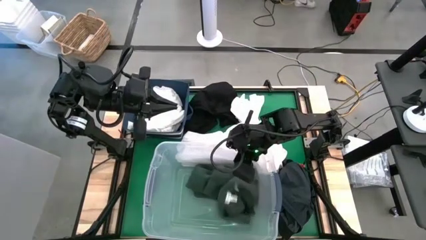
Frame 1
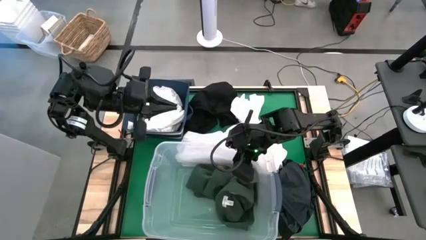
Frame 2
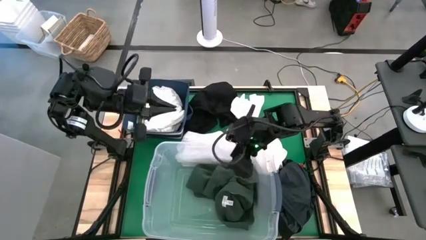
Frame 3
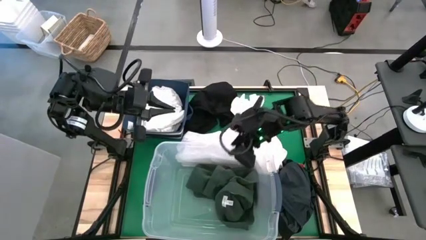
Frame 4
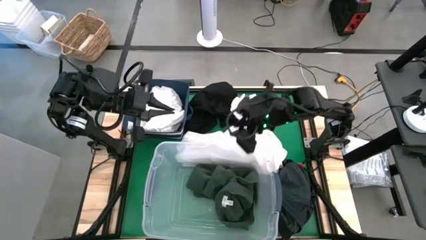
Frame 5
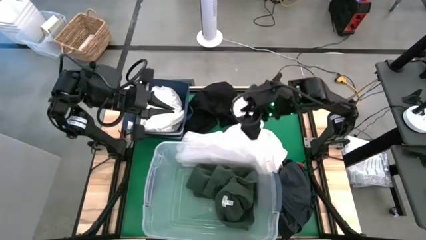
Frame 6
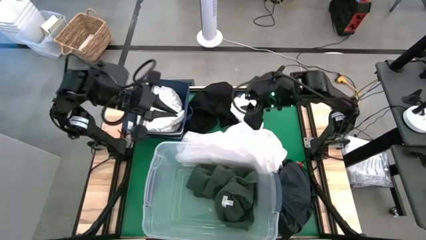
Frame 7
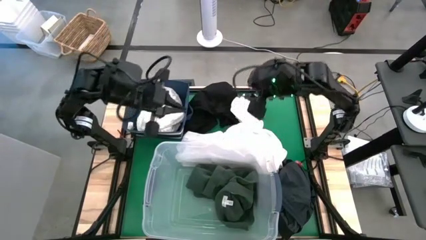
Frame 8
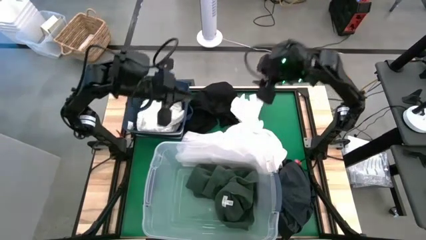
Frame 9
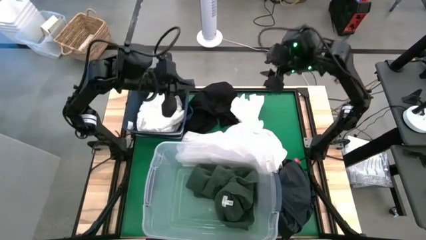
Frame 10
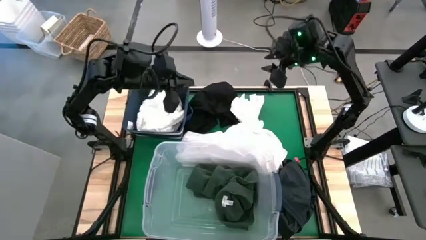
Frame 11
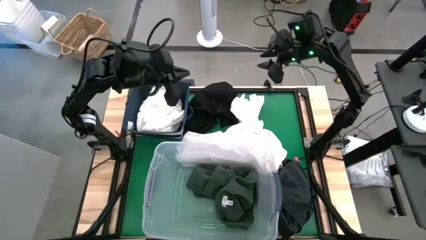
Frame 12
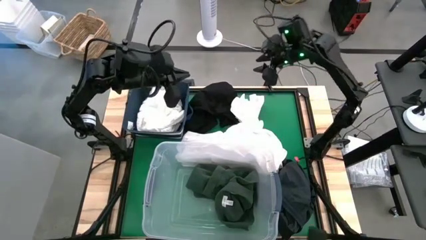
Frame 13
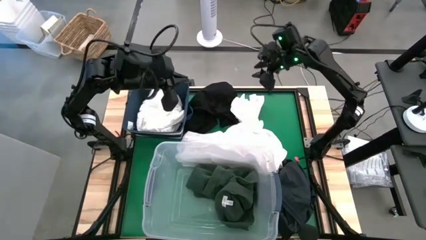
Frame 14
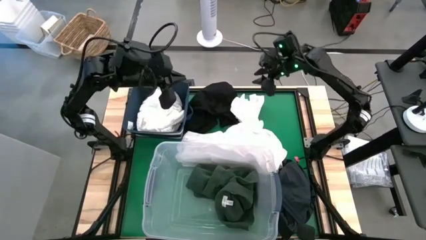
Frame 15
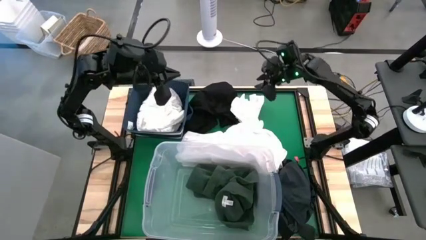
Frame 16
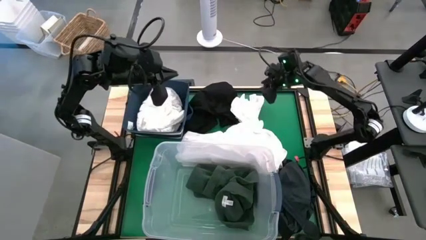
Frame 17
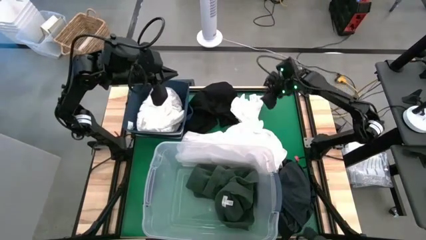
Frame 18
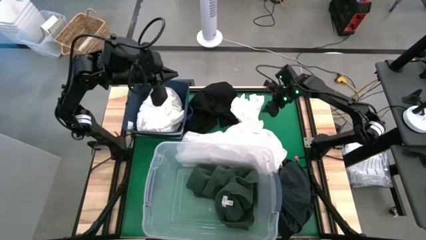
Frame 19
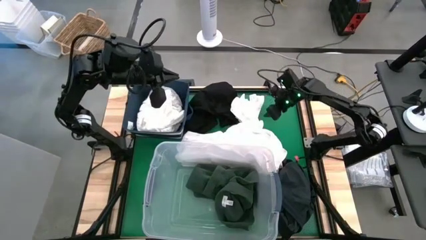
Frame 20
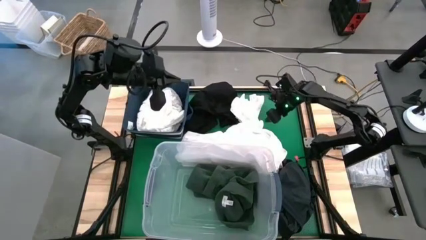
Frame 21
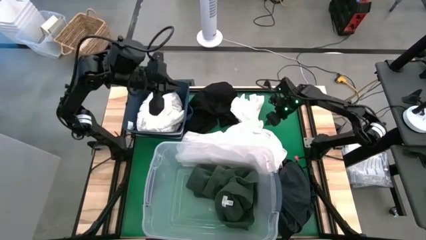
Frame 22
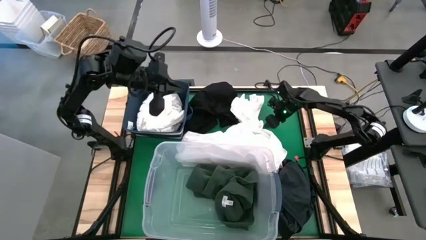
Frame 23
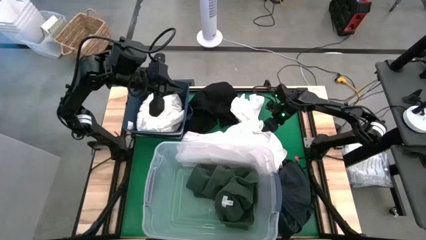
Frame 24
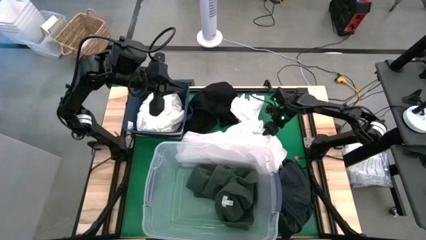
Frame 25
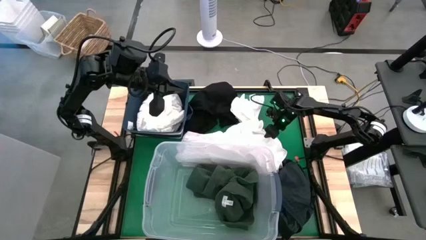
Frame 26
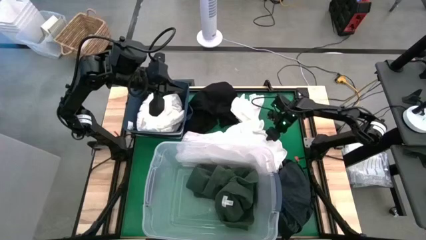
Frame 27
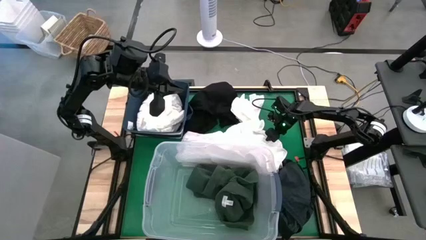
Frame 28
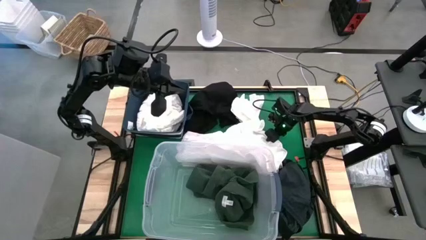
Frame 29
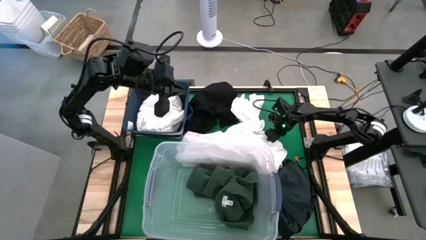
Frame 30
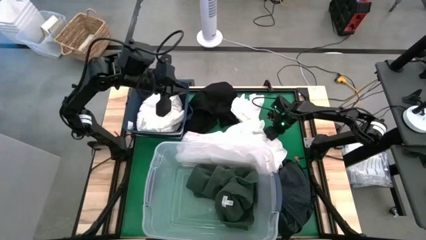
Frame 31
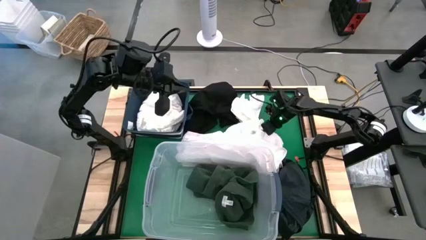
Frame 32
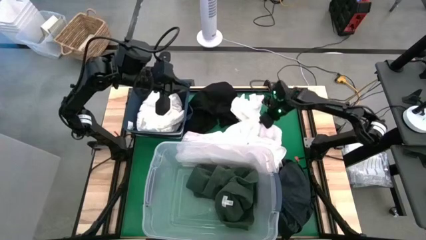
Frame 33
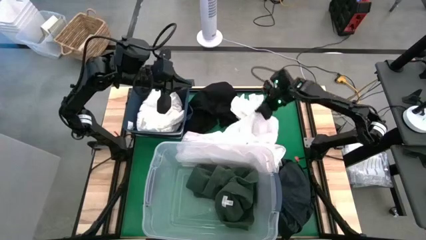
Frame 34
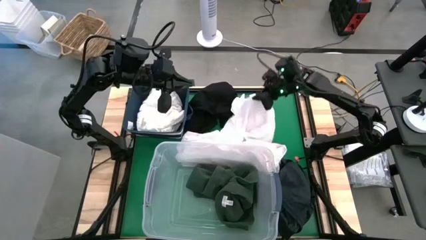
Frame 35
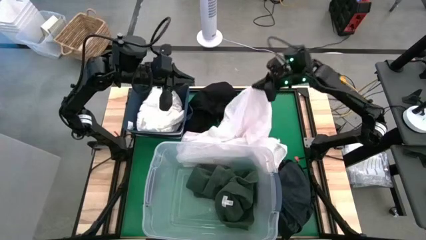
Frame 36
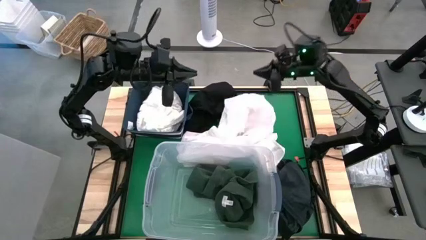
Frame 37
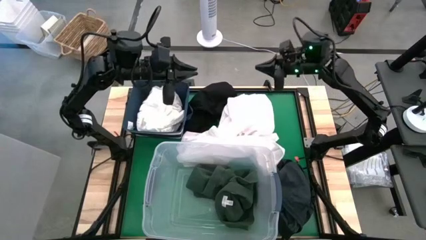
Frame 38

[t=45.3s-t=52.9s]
Put the white shirt into the blue laundry bin

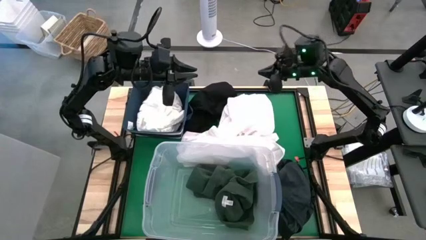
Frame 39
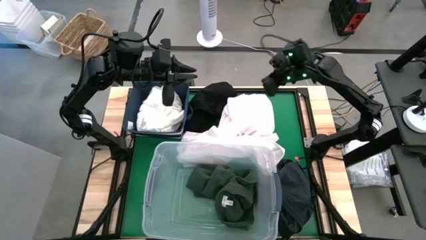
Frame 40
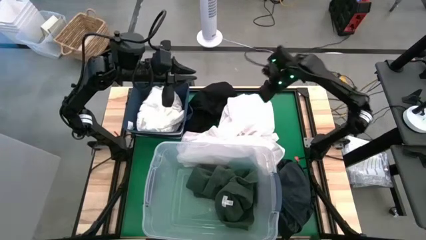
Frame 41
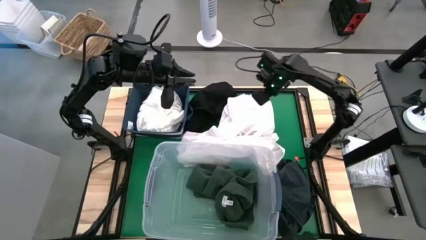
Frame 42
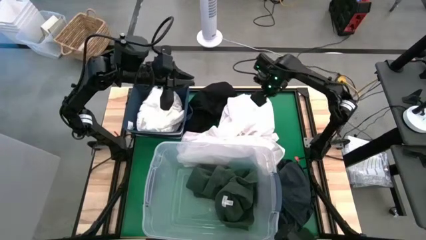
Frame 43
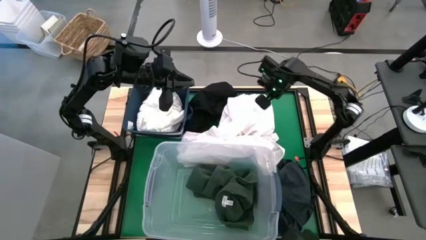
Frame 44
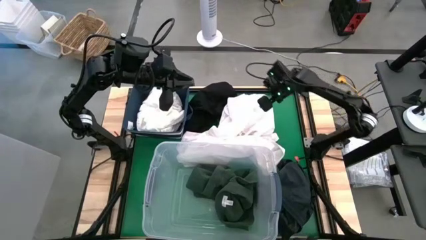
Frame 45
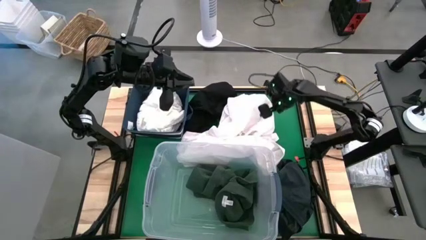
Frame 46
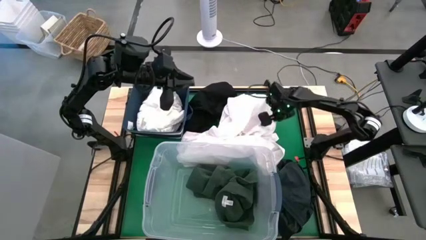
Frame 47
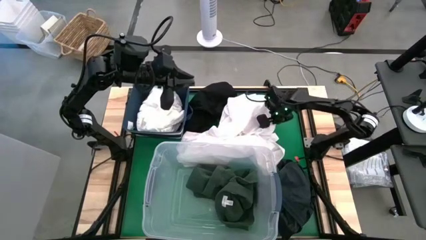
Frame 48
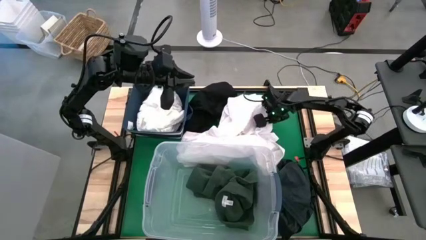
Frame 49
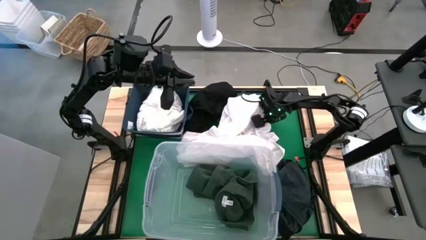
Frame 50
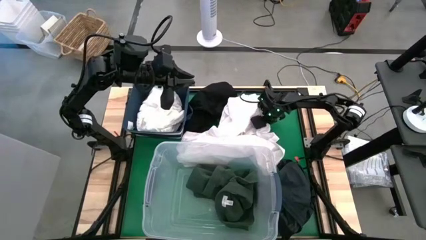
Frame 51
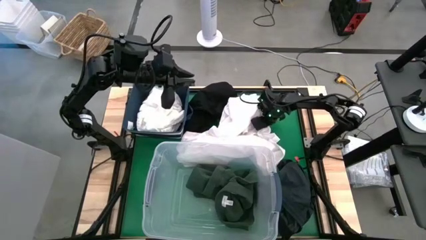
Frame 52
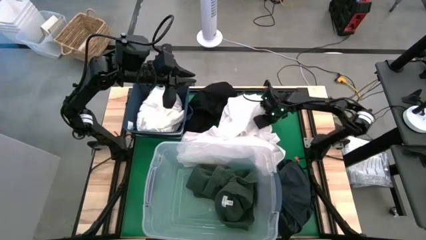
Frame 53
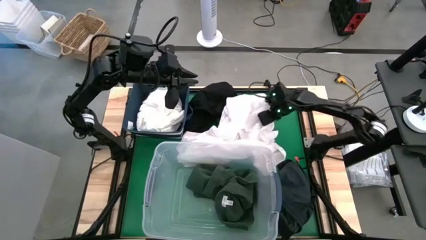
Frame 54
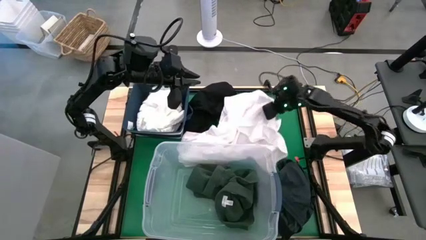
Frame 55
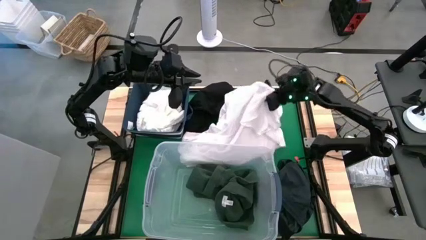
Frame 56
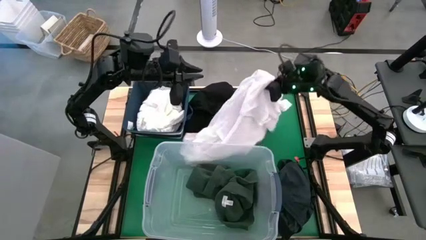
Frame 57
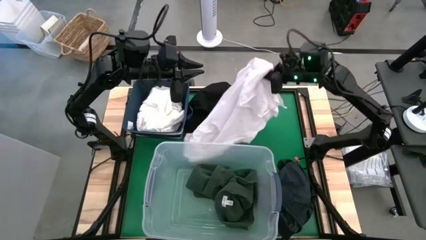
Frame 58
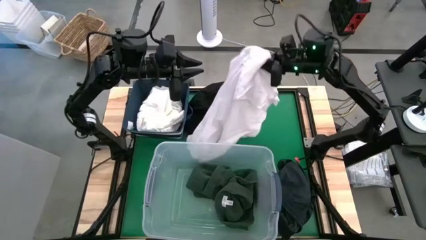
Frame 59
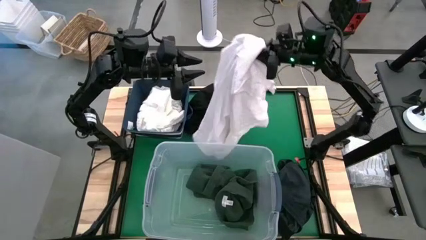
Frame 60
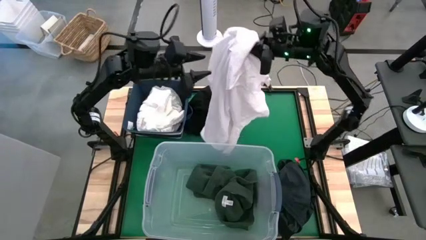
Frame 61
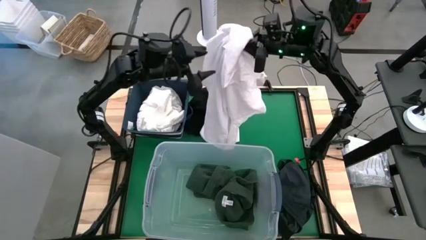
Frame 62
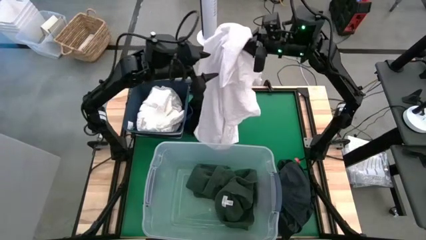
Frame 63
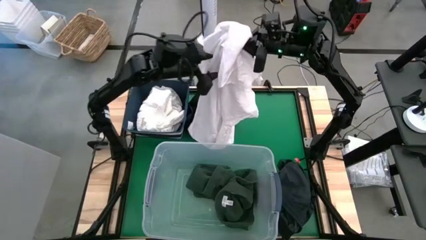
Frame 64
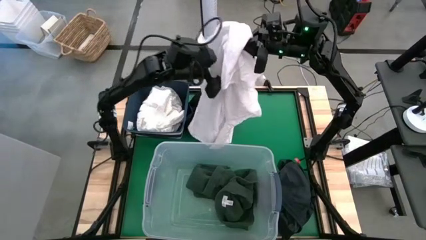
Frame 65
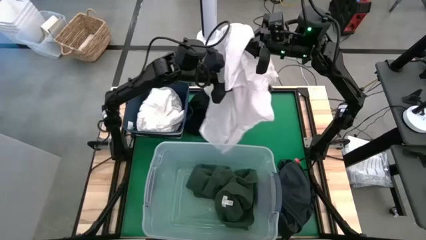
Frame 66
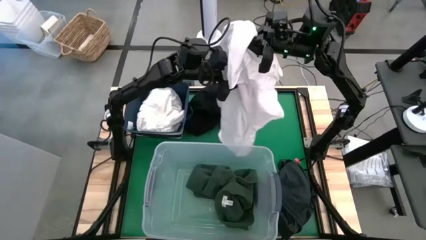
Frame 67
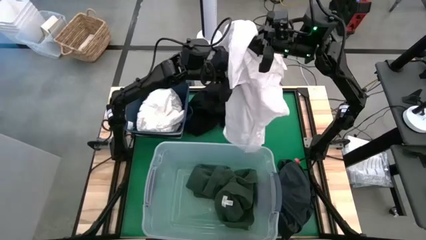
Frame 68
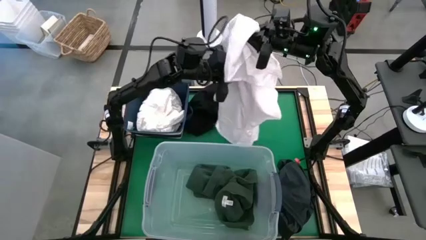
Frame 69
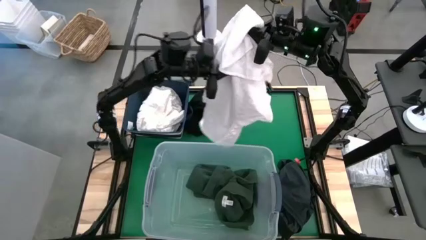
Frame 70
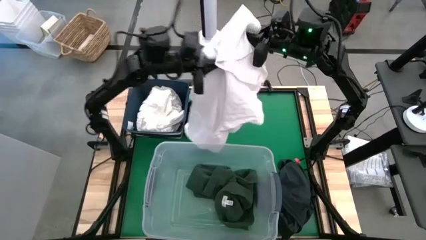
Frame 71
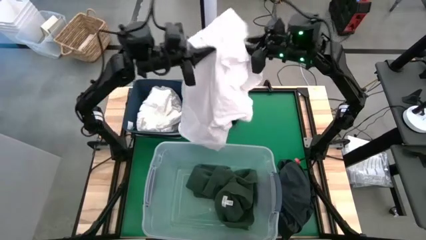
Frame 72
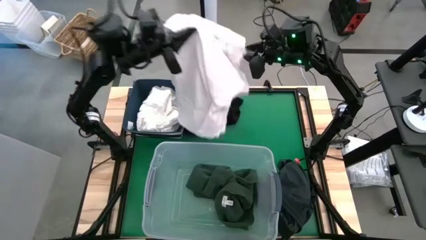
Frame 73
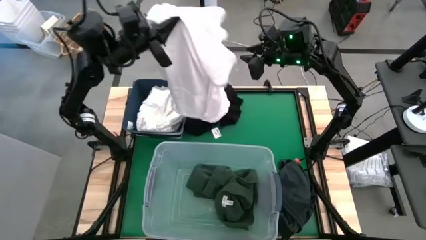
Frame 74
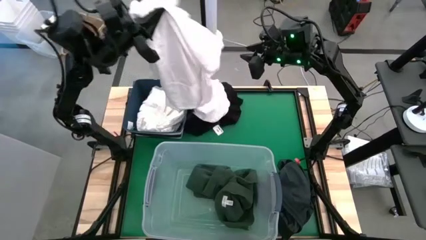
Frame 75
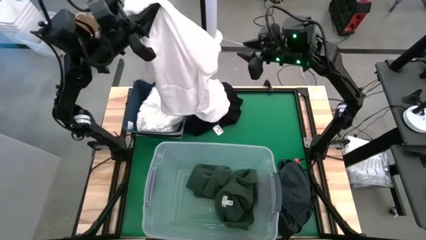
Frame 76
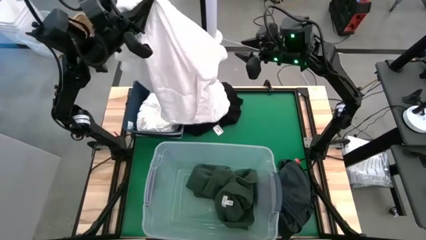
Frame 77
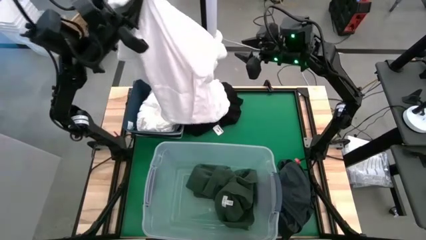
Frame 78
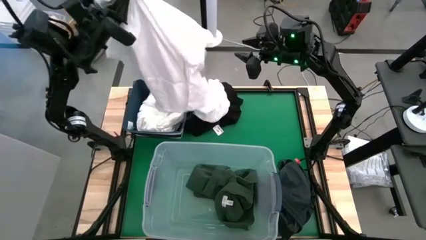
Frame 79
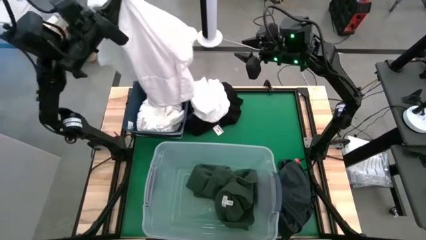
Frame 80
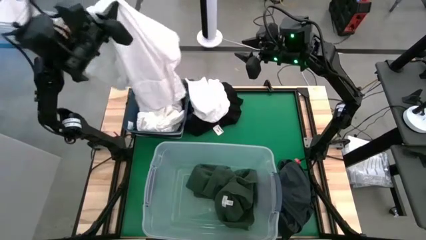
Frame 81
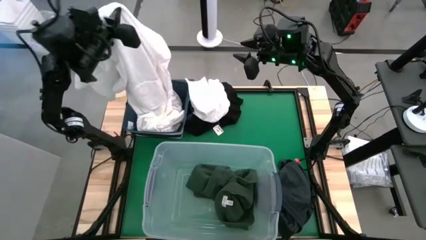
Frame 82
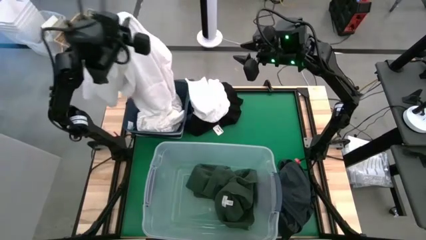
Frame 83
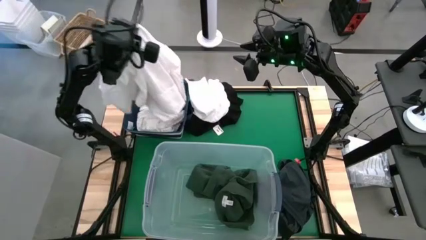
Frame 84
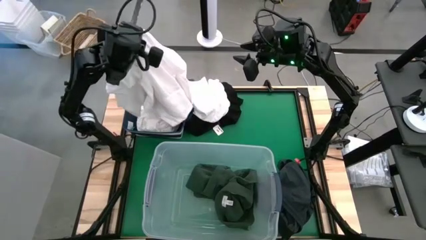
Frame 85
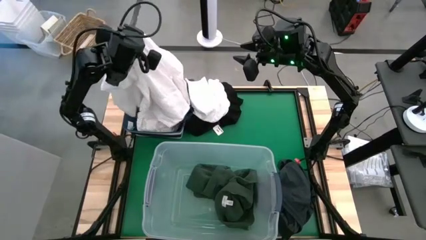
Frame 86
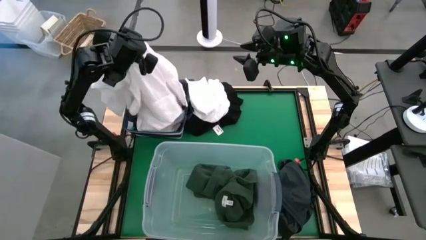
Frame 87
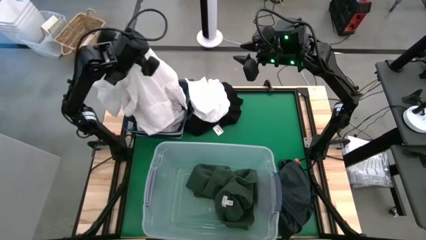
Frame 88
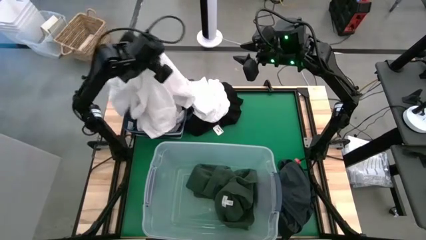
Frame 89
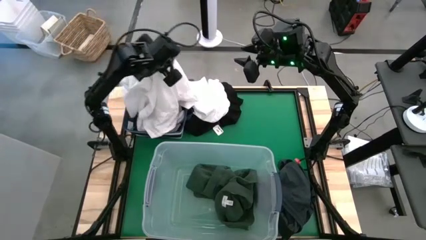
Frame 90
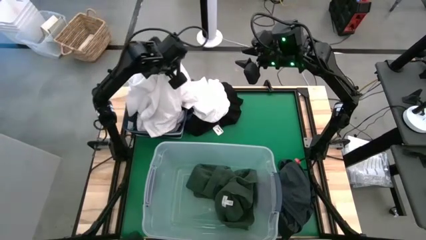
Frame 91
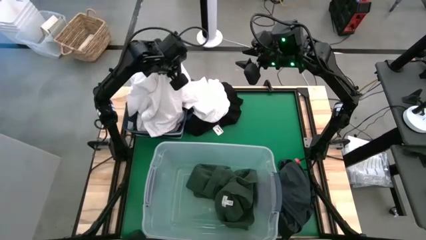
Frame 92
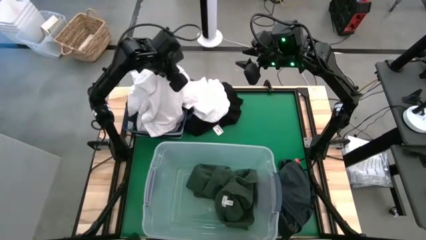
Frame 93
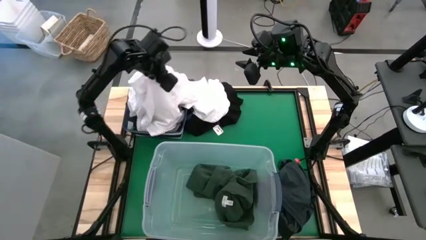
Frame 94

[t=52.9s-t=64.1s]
Put the white shirt into the blue laundry bin
